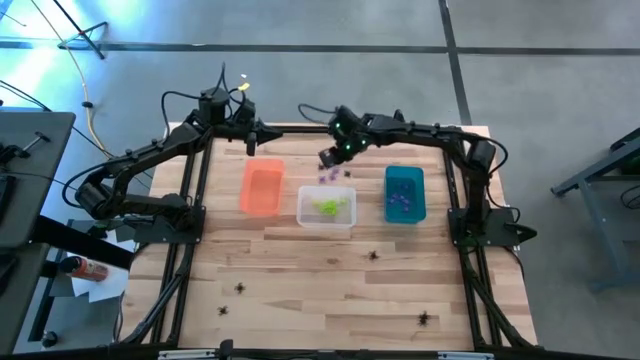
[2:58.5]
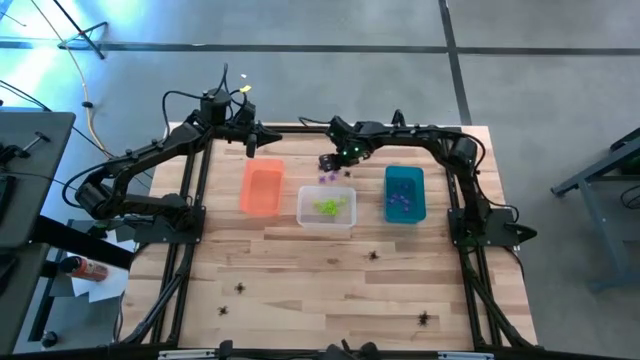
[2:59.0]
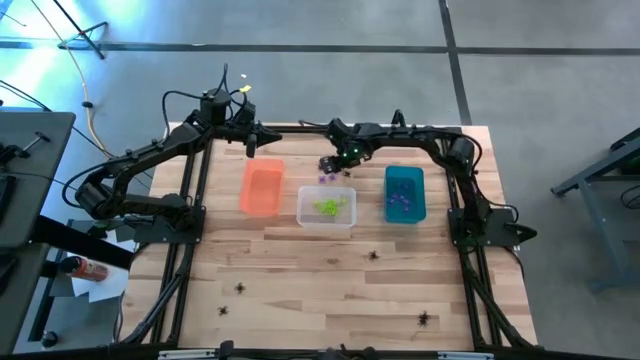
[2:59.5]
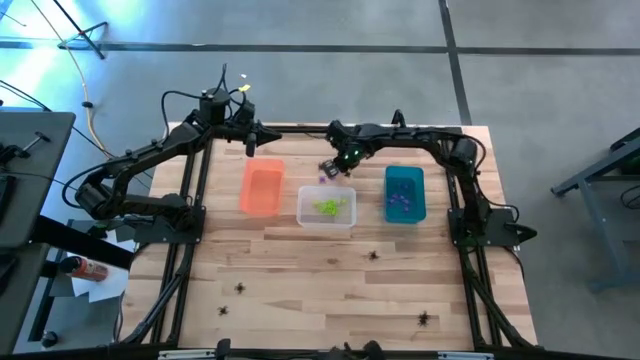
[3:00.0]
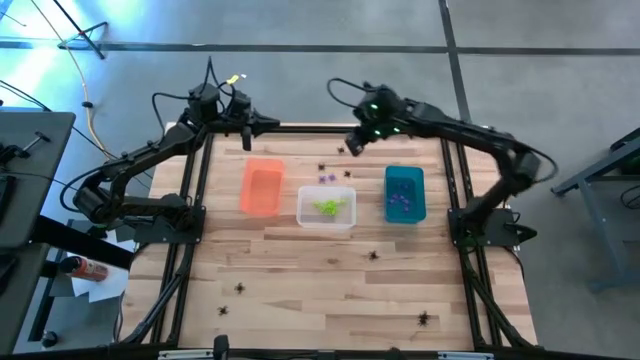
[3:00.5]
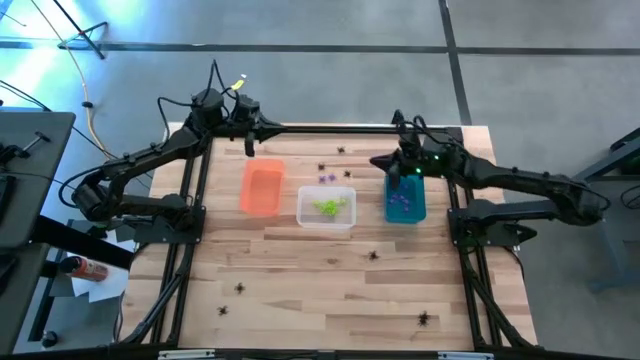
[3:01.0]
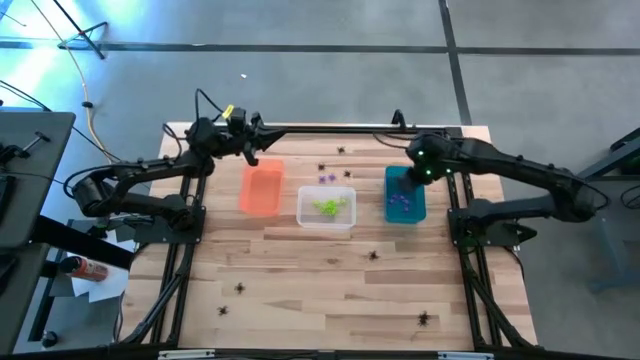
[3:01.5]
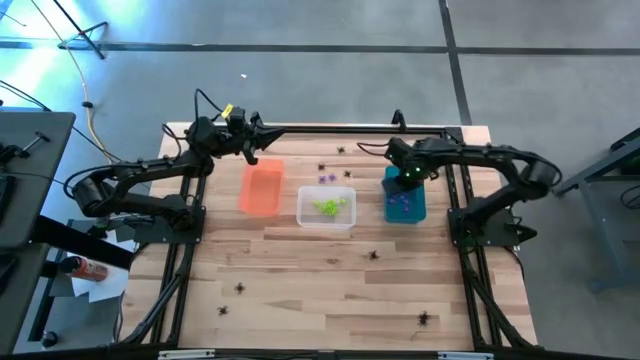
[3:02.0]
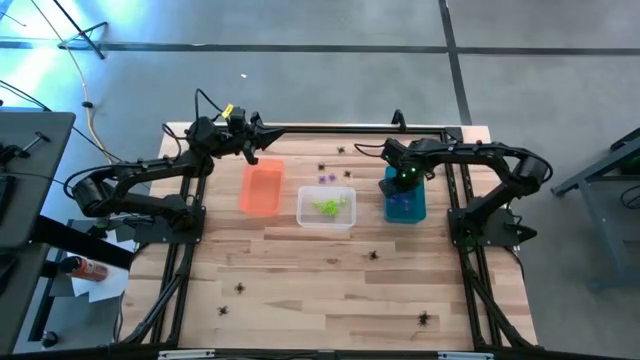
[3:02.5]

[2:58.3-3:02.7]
Task: Sort Halloween decoration
Put the purple spider toy into the blue bin

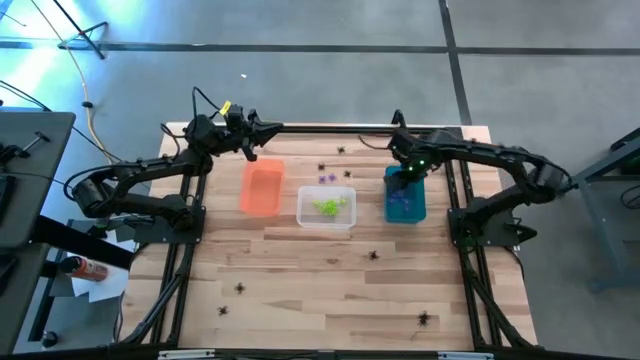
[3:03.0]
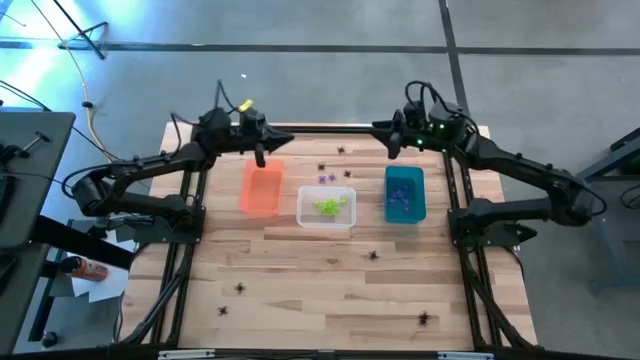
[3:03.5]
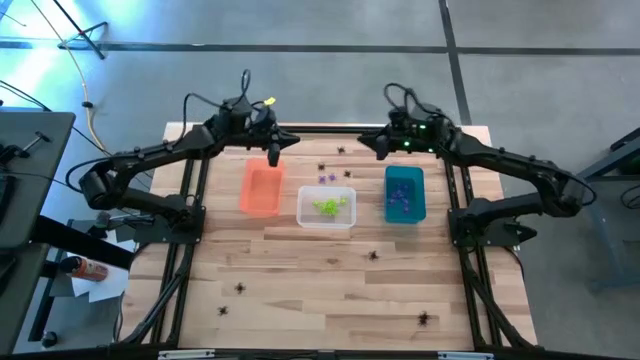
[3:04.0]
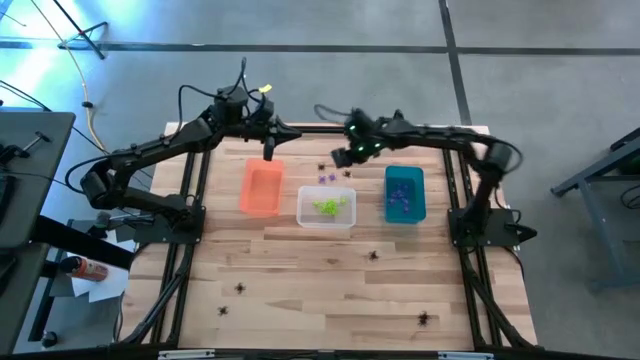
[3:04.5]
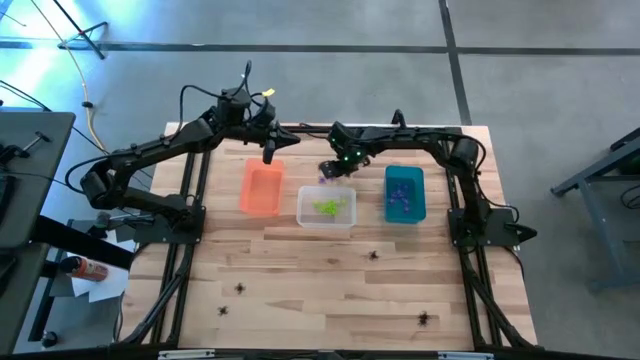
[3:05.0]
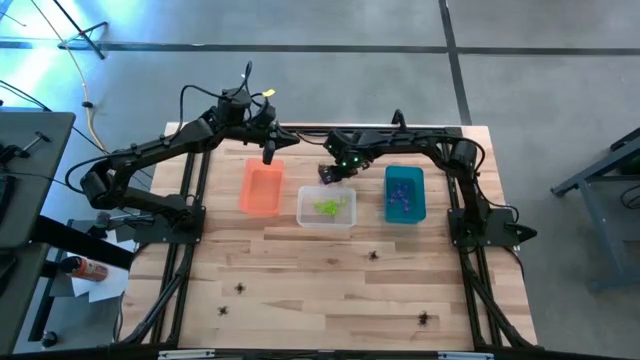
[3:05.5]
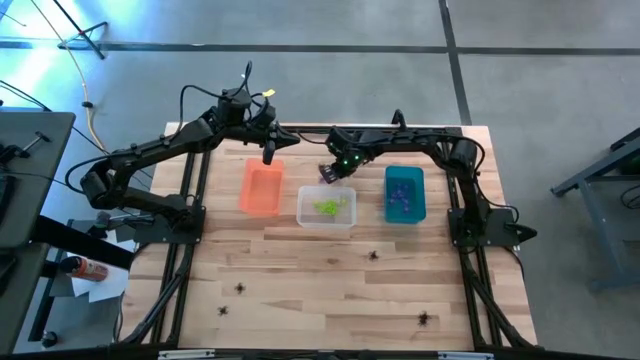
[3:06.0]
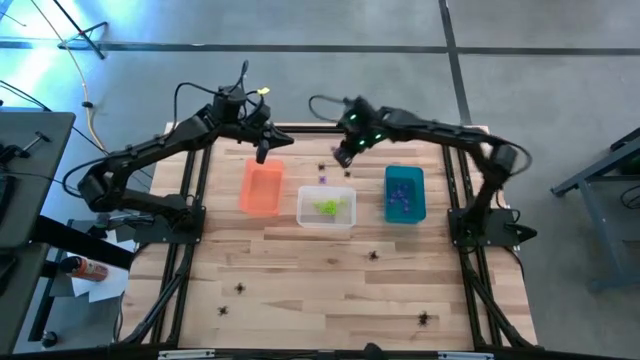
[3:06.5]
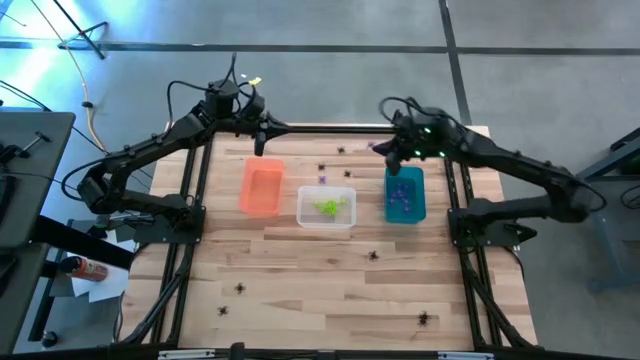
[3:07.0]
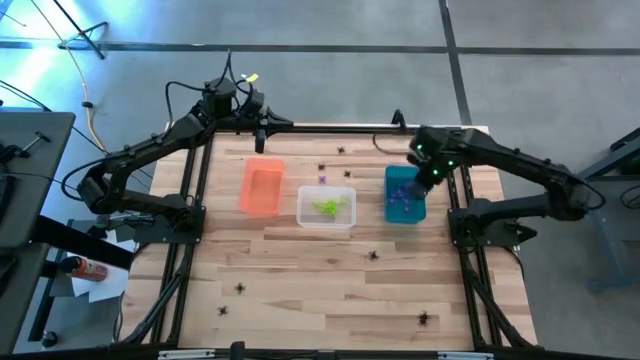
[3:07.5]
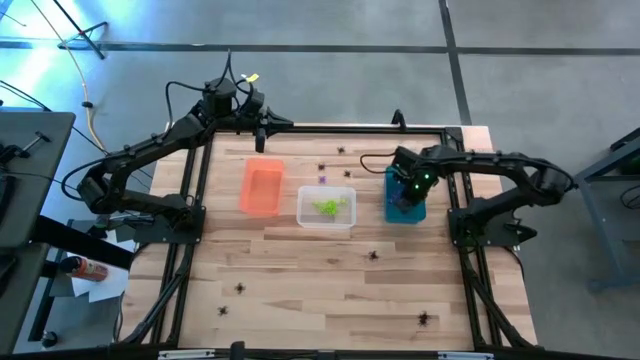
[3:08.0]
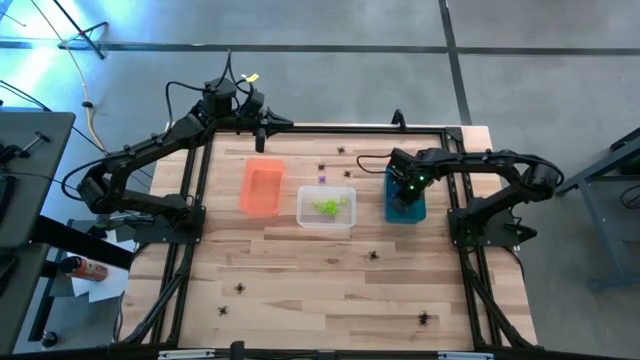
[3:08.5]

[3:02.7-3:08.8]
Put the purple spider toy into the blue bin

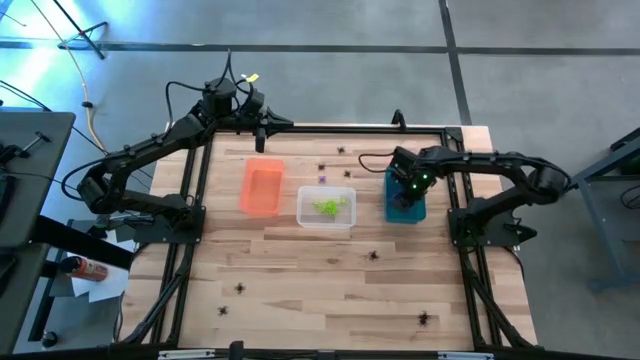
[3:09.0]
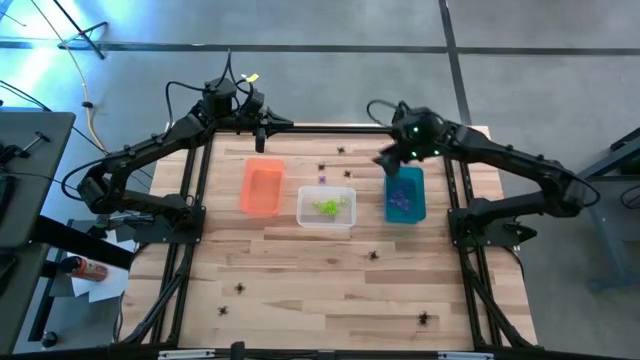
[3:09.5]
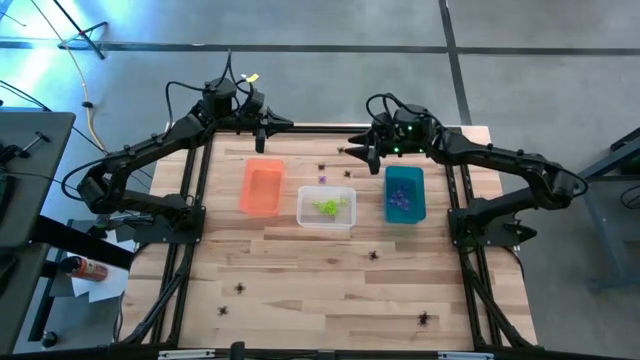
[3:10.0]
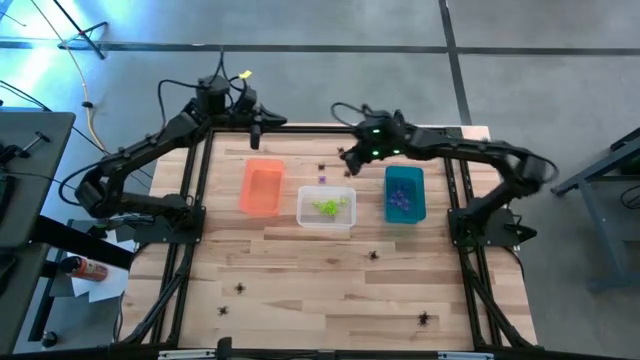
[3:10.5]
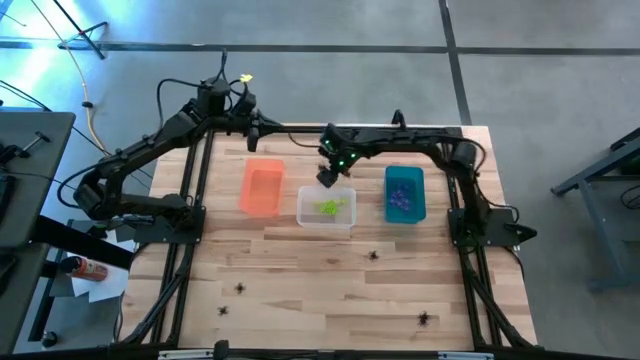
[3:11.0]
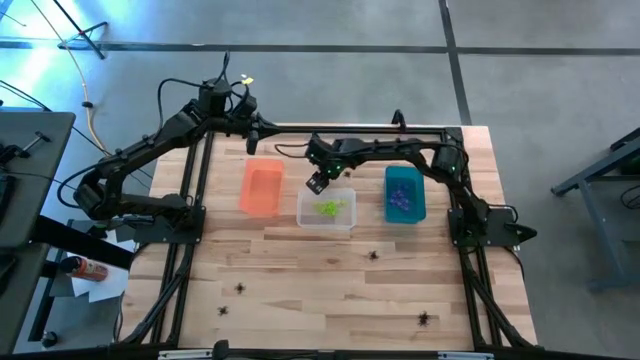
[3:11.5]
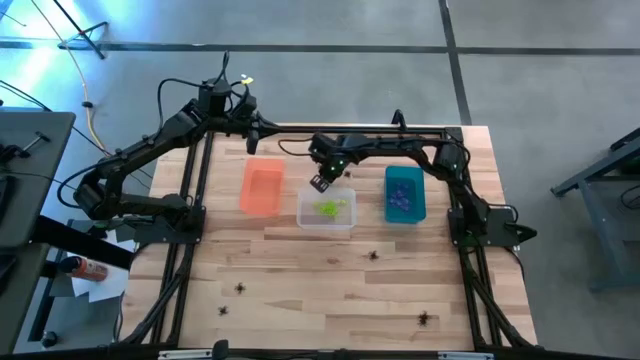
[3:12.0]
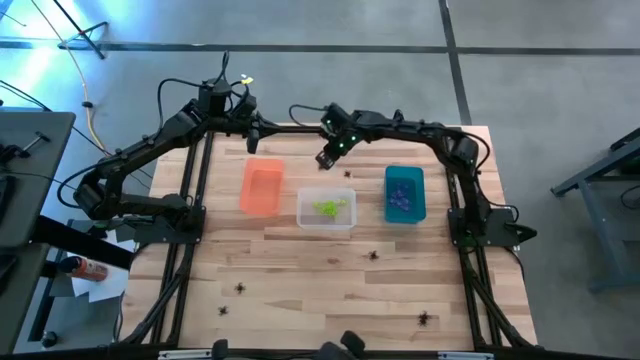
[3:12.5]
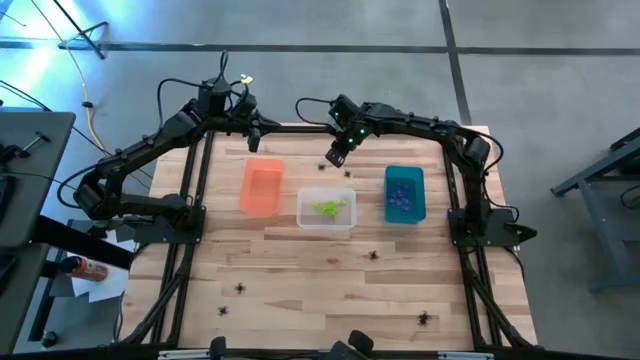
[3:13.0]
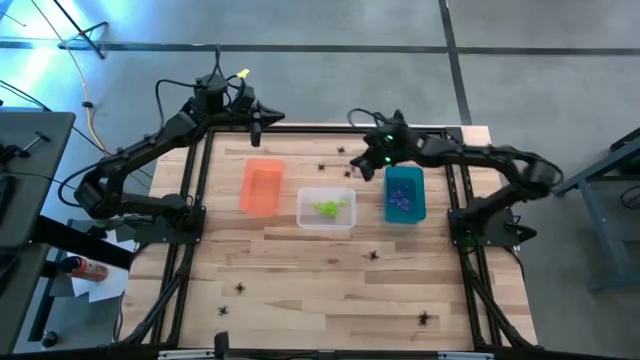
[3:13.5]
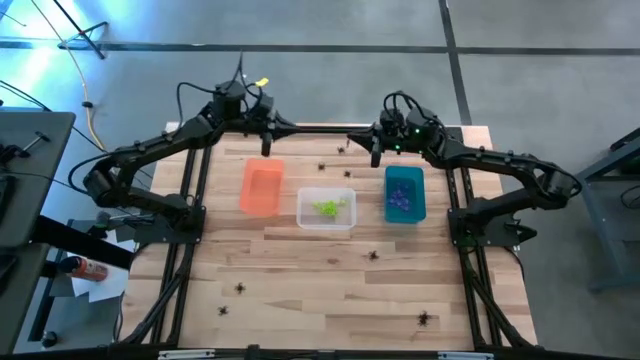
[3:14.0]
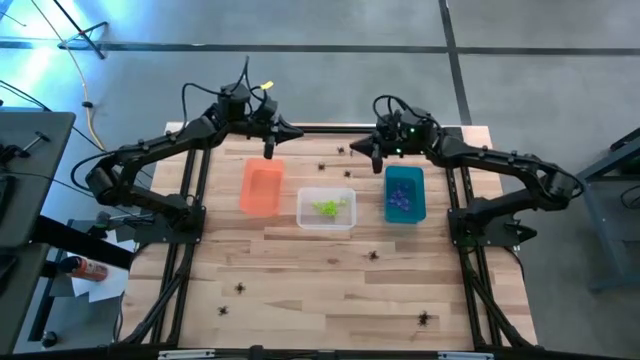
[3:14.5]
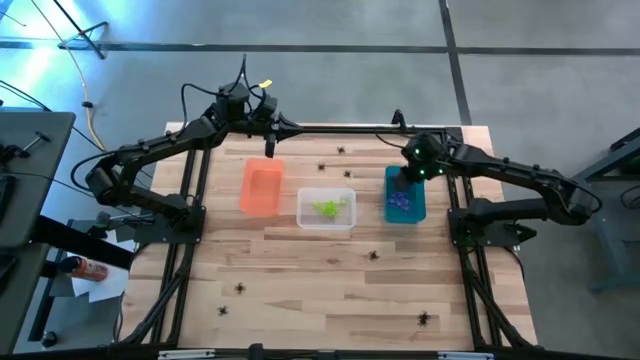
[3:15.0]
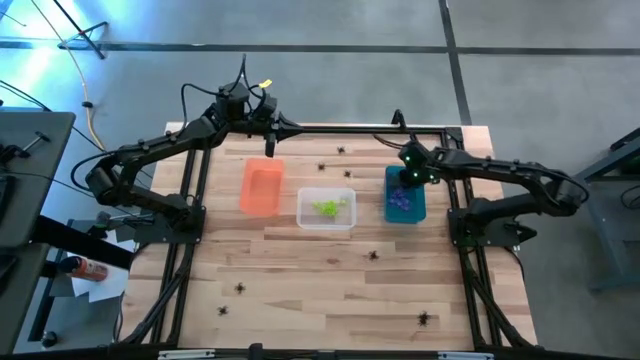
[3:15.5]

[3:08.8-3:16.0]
Put the purple spider toy into the blue bin

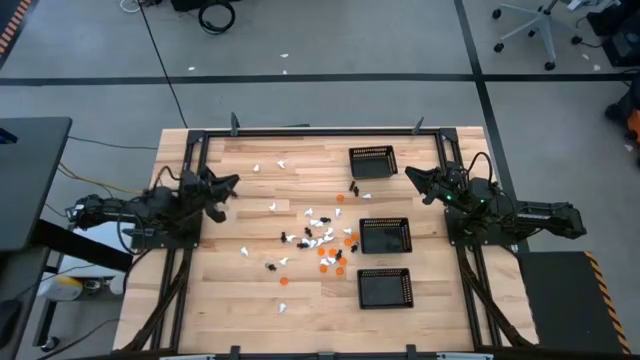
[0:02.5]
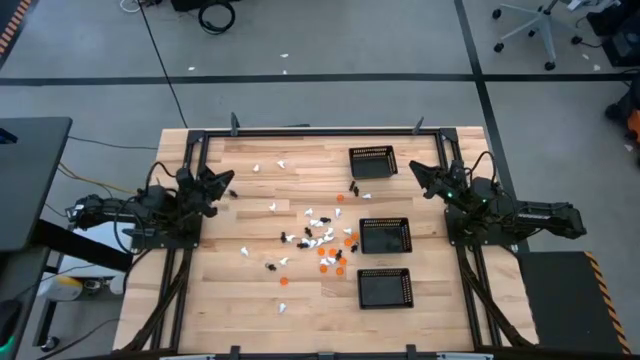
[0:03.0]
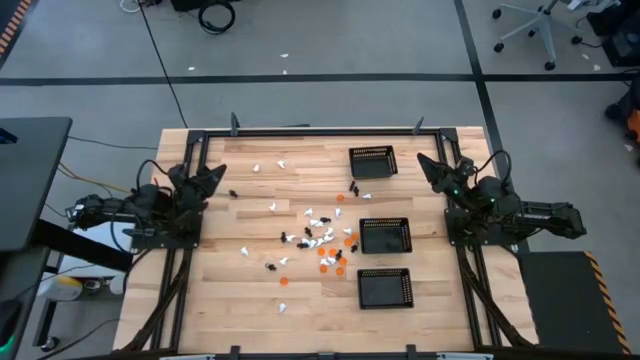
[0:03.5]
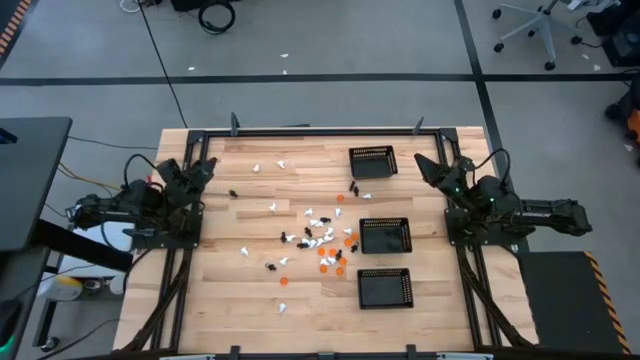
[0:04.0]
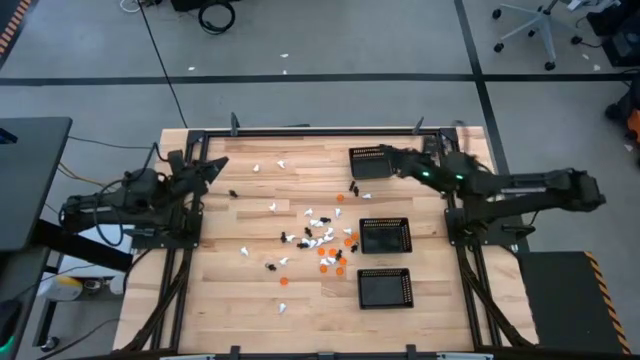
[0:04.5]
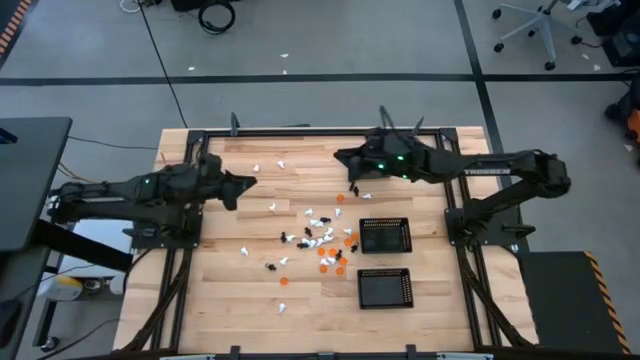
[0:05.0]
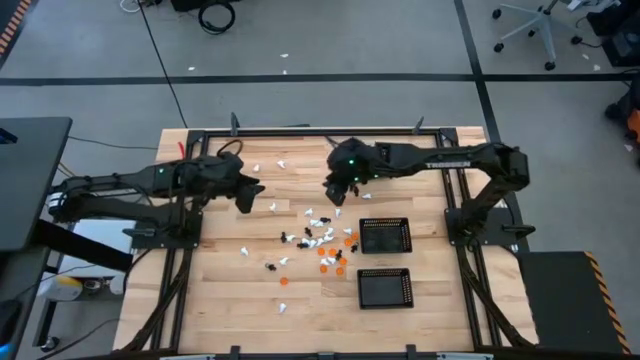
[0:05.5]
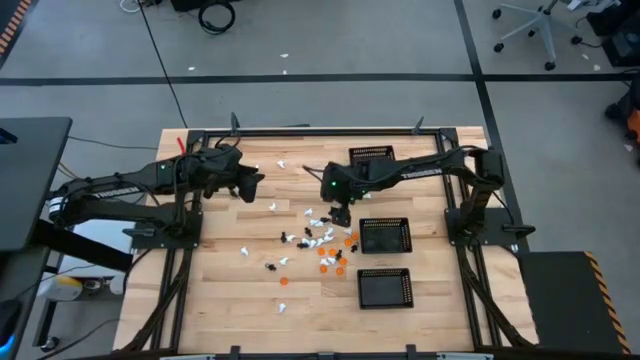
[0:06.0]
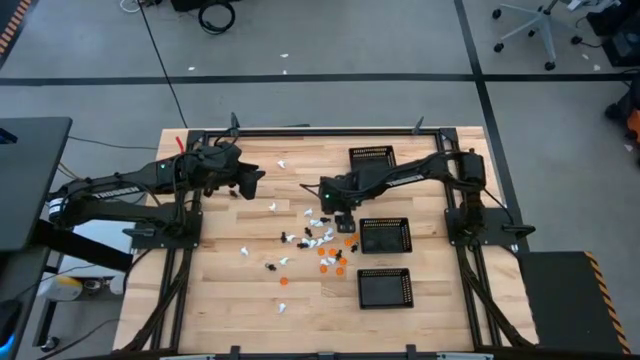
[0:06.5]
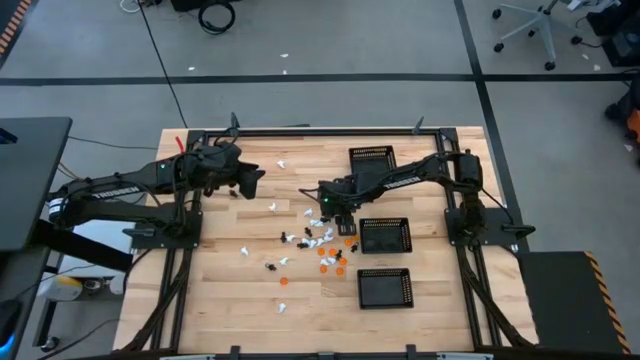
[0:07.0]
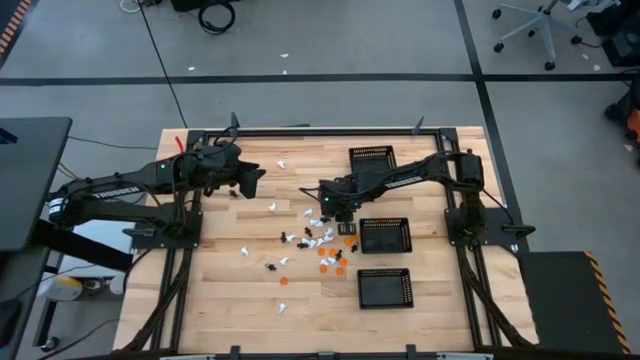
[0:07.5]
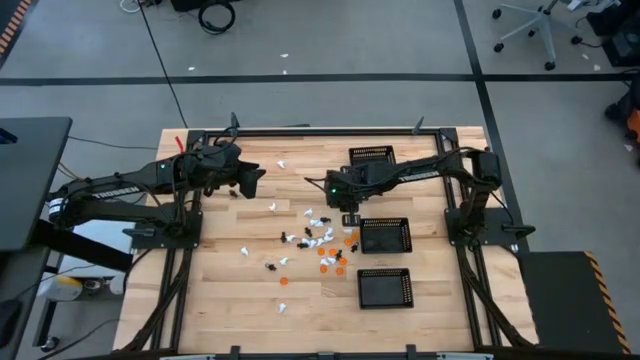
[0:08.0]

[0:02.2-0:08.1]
Task: Sort Halloween decoration
Put the white ghost toy into the top black bin
